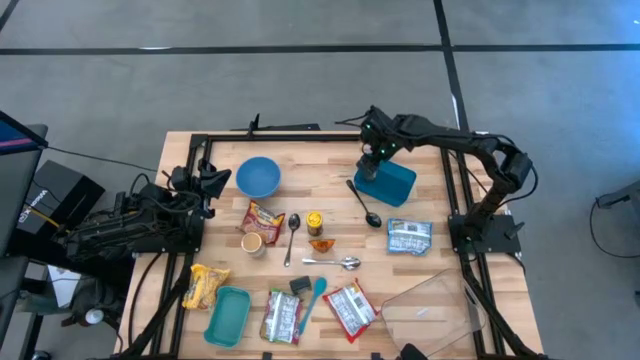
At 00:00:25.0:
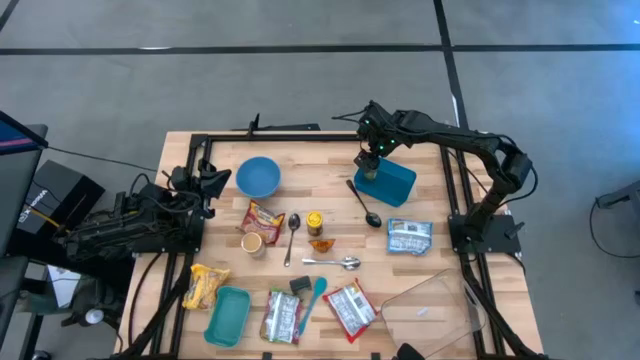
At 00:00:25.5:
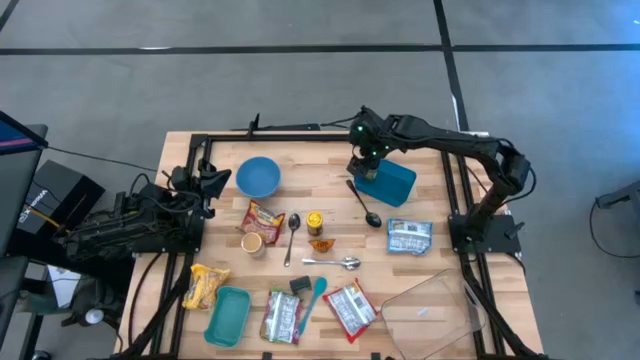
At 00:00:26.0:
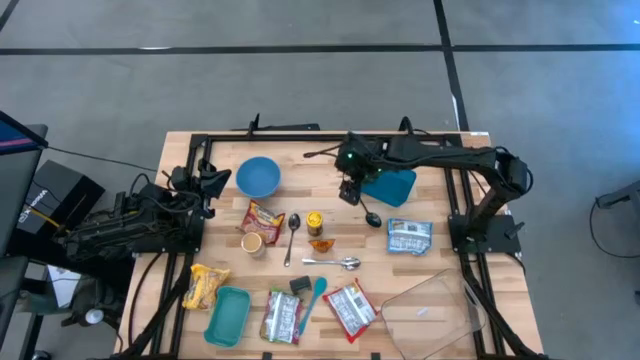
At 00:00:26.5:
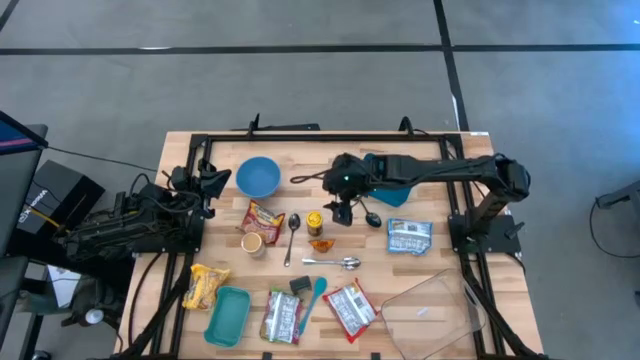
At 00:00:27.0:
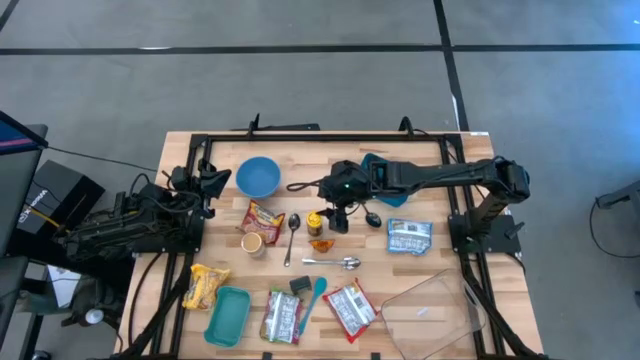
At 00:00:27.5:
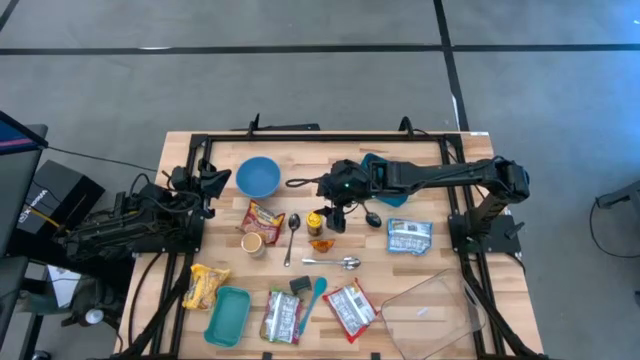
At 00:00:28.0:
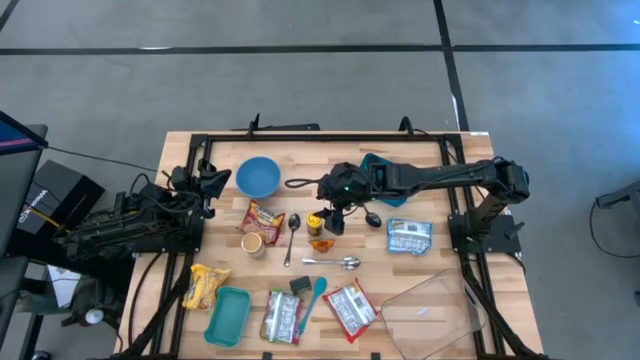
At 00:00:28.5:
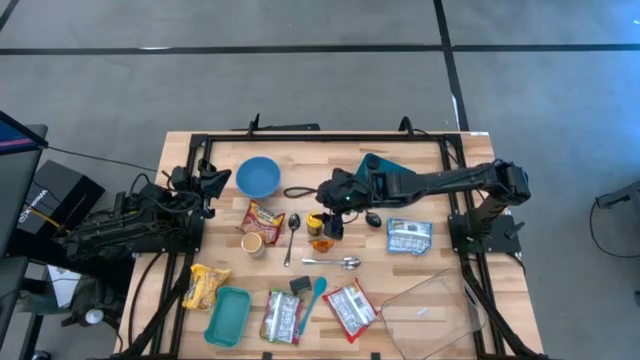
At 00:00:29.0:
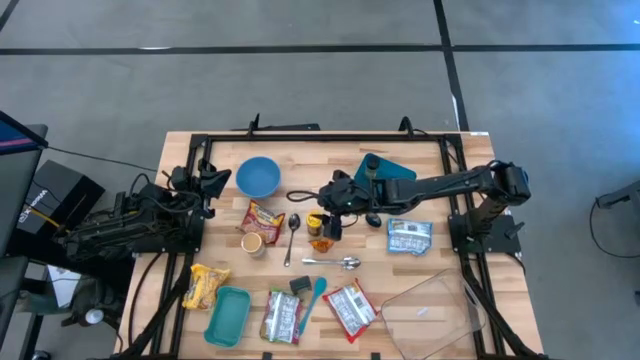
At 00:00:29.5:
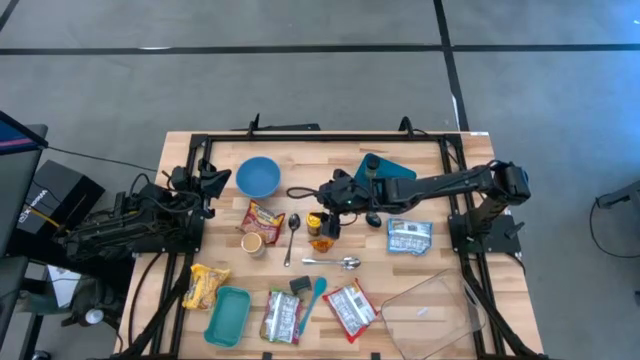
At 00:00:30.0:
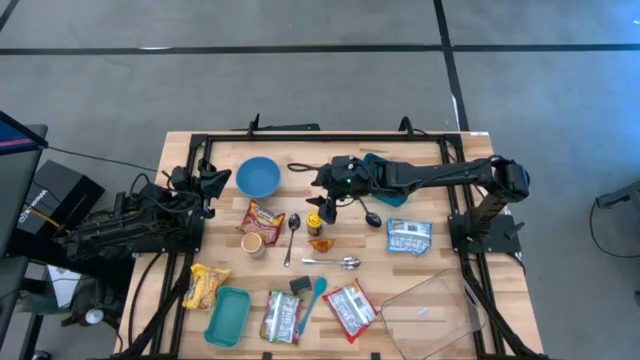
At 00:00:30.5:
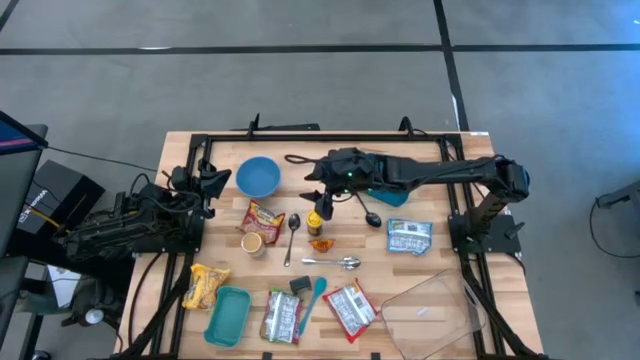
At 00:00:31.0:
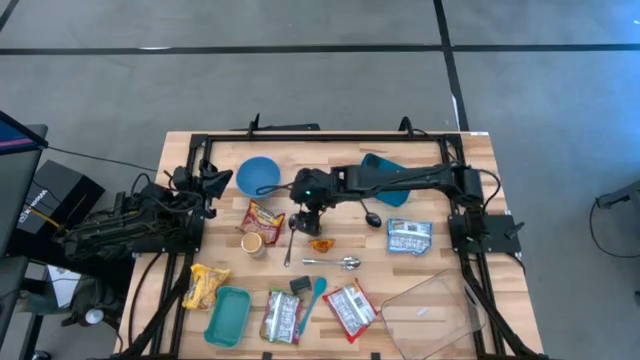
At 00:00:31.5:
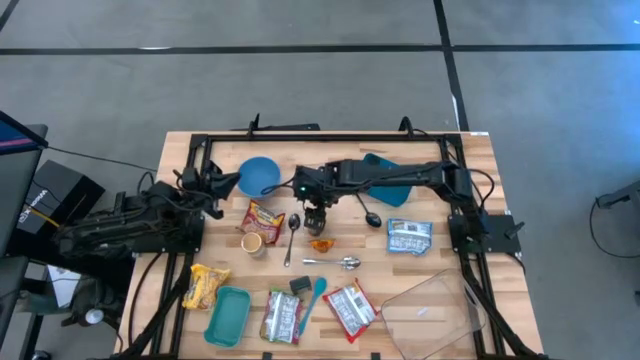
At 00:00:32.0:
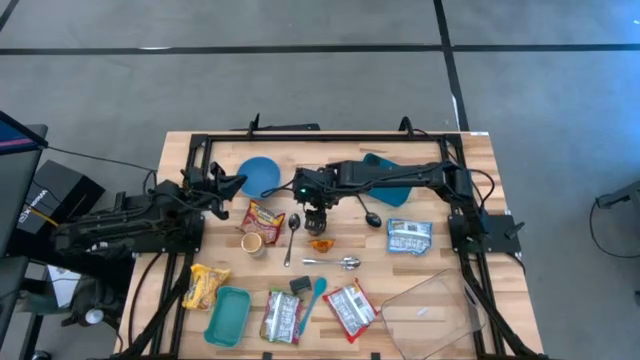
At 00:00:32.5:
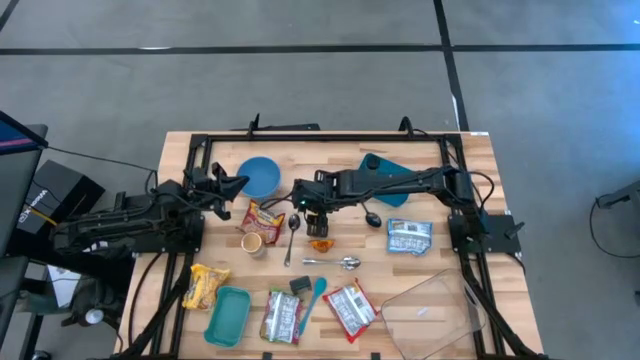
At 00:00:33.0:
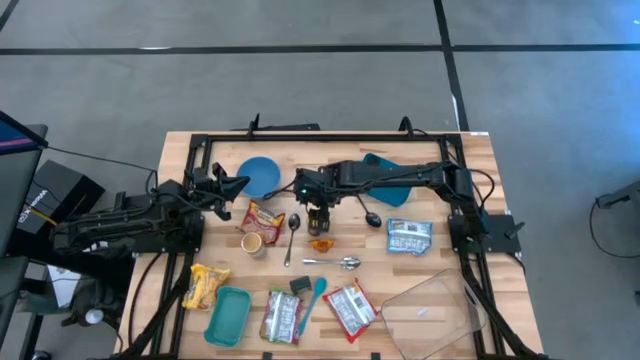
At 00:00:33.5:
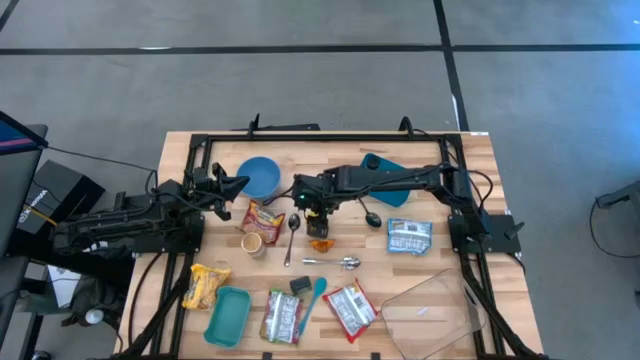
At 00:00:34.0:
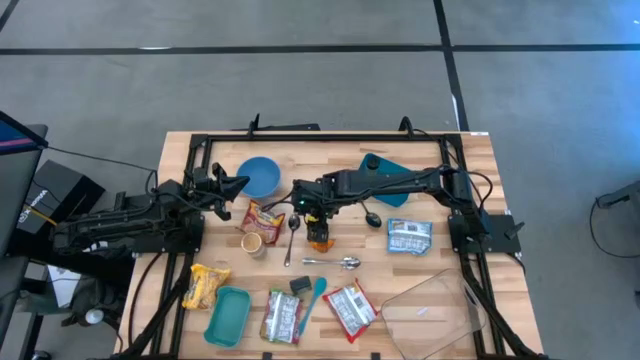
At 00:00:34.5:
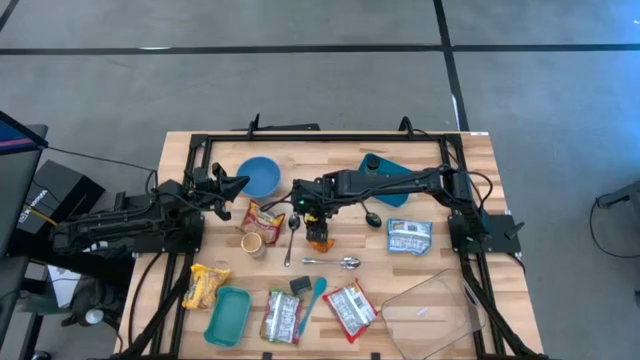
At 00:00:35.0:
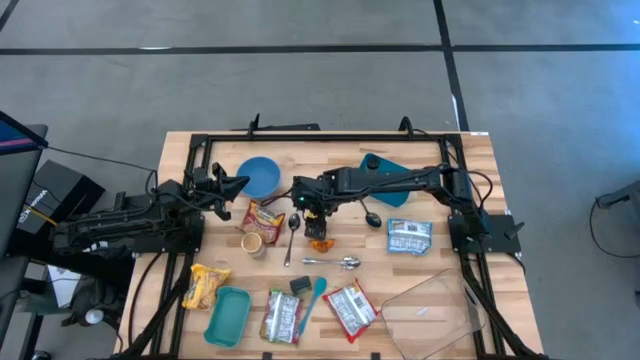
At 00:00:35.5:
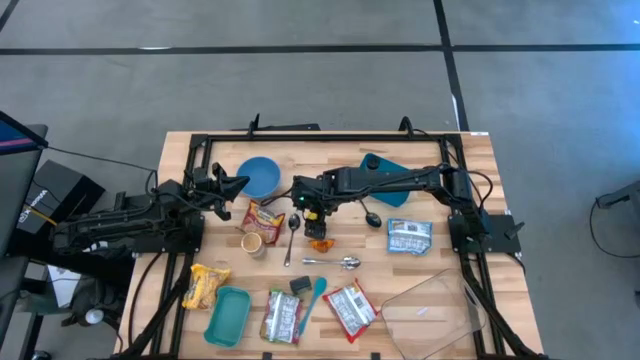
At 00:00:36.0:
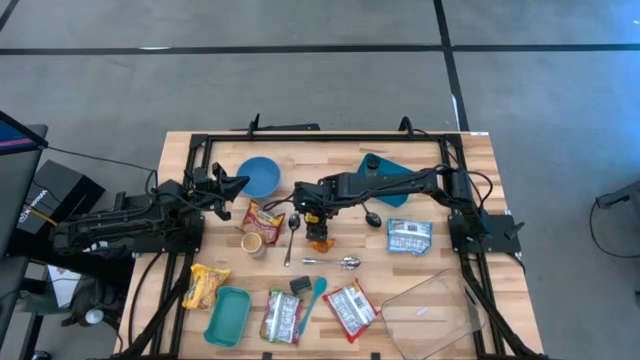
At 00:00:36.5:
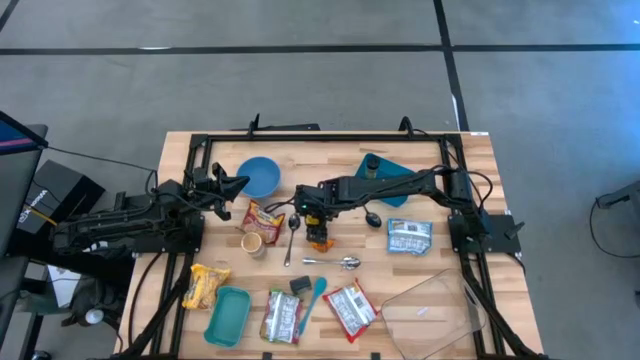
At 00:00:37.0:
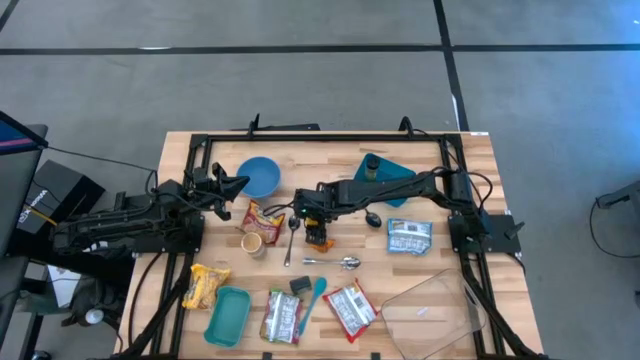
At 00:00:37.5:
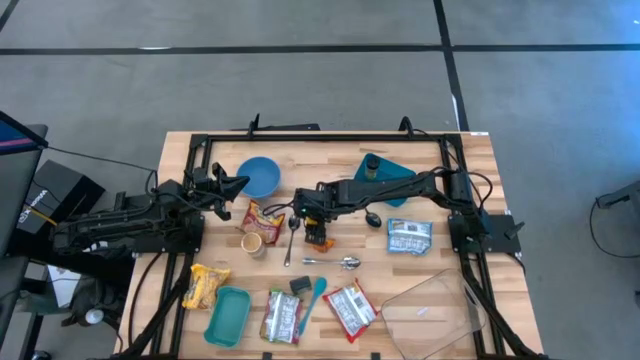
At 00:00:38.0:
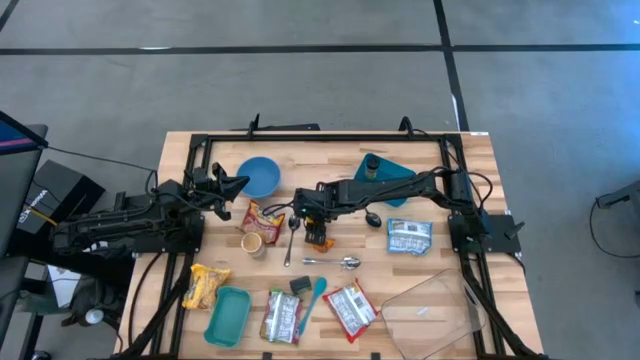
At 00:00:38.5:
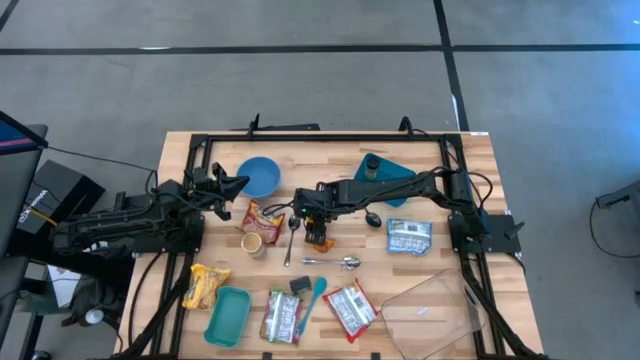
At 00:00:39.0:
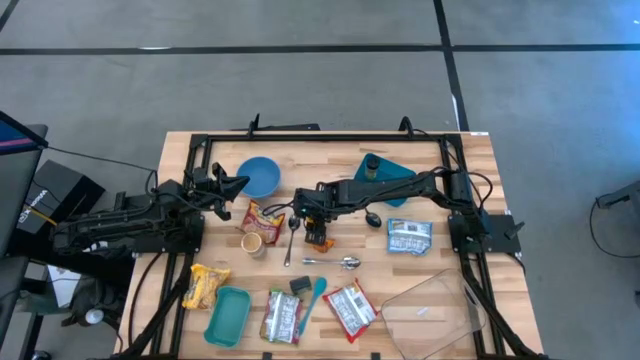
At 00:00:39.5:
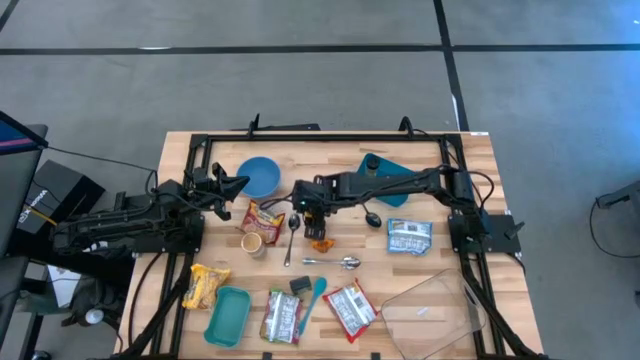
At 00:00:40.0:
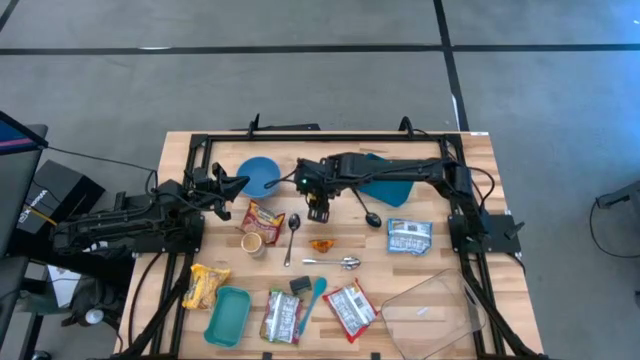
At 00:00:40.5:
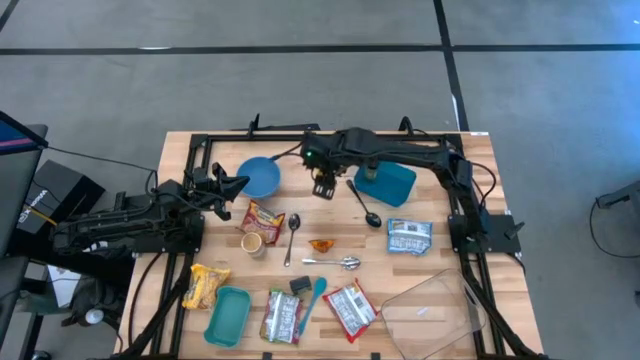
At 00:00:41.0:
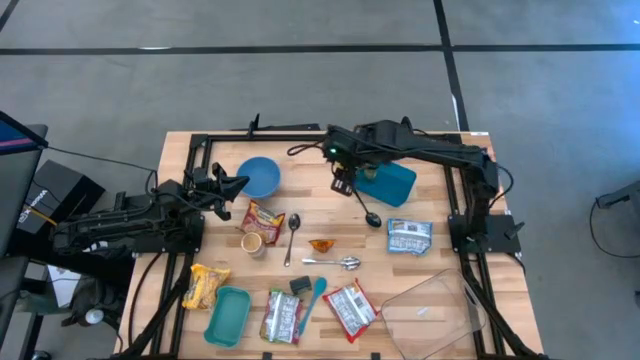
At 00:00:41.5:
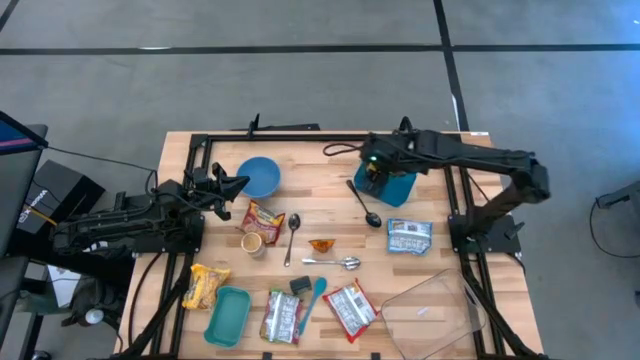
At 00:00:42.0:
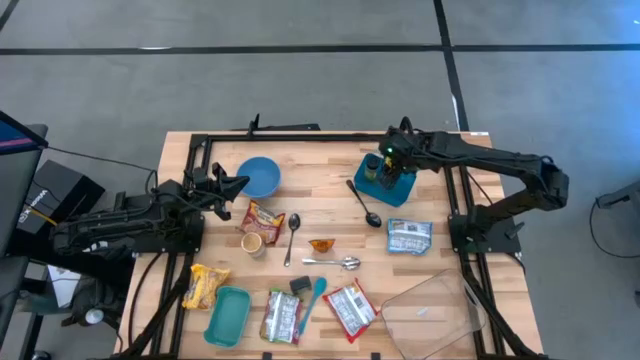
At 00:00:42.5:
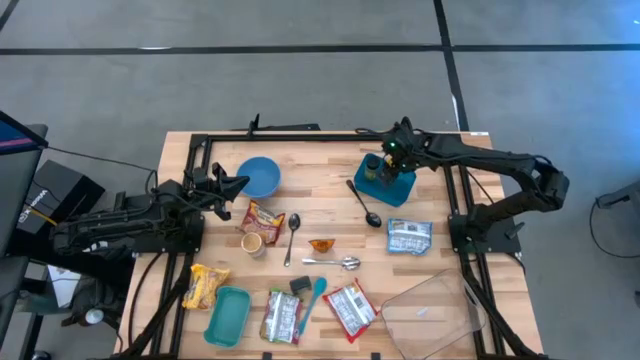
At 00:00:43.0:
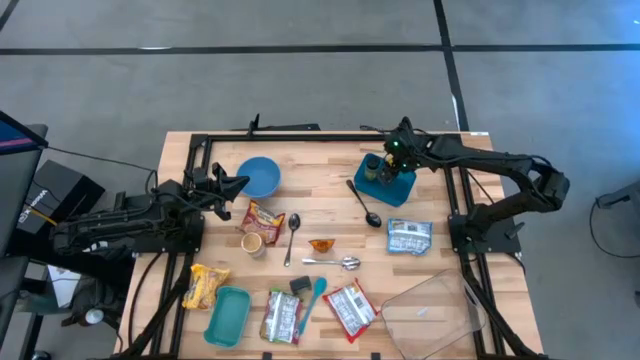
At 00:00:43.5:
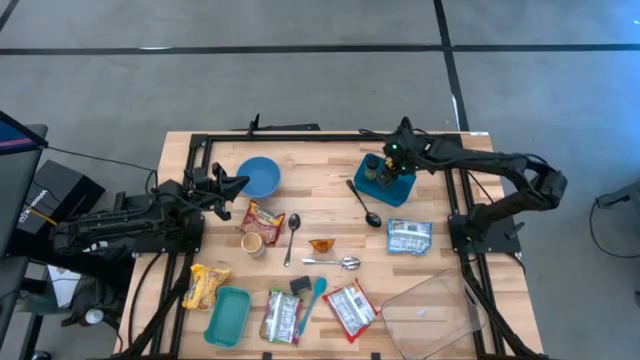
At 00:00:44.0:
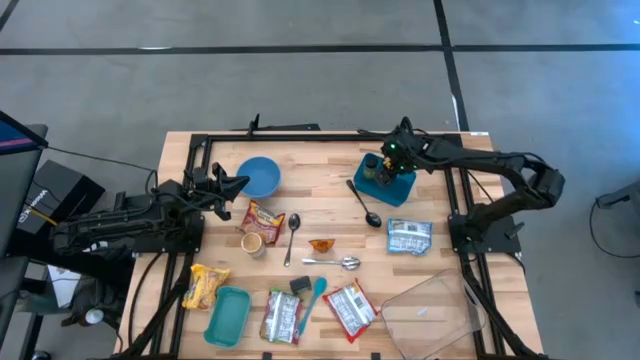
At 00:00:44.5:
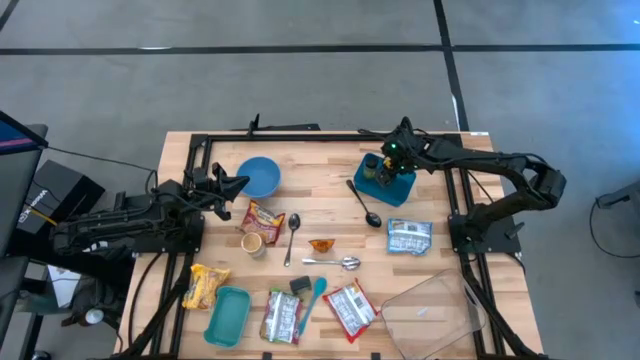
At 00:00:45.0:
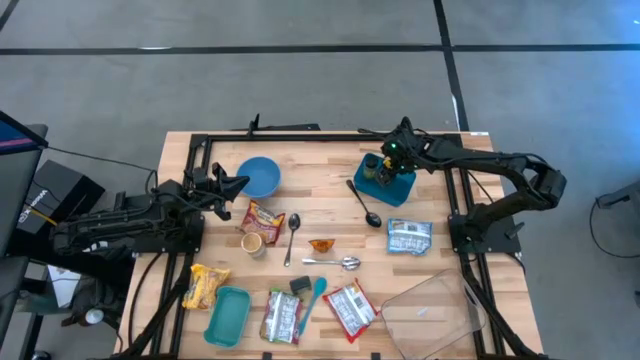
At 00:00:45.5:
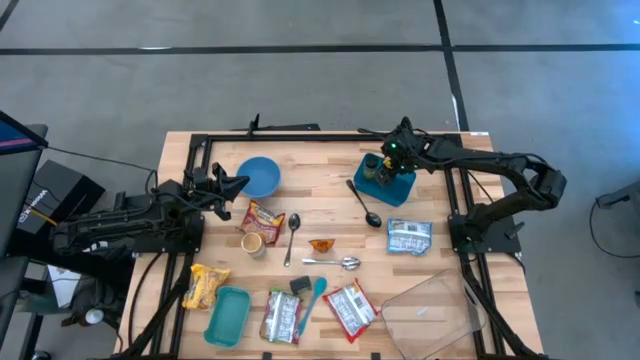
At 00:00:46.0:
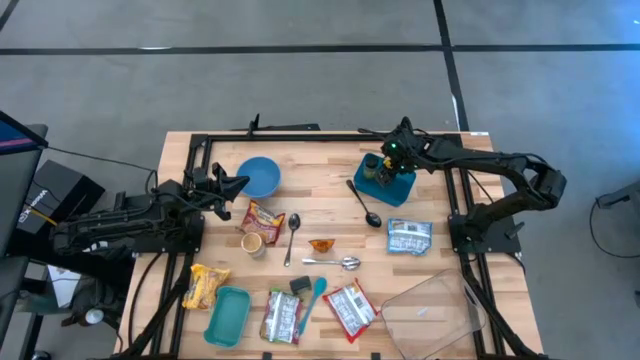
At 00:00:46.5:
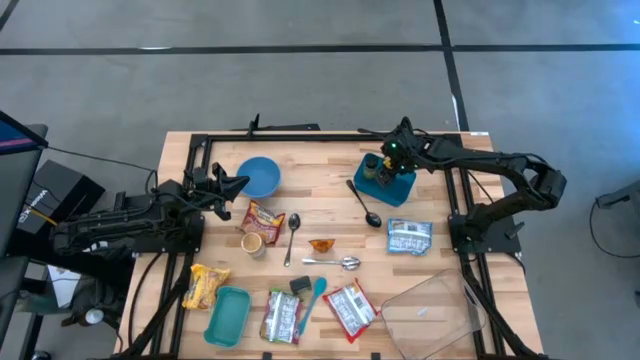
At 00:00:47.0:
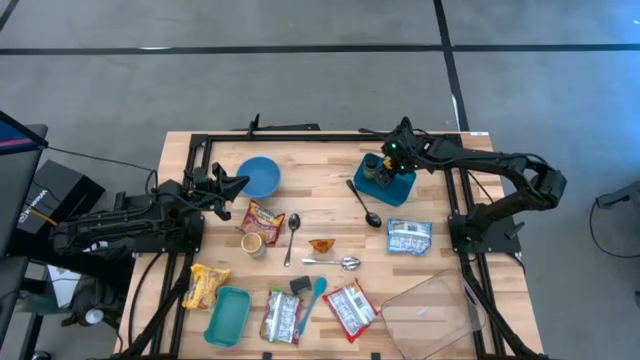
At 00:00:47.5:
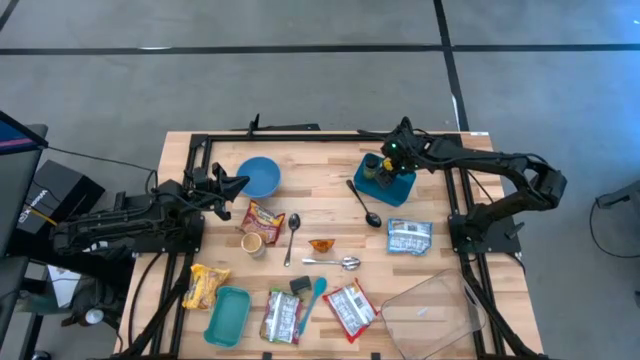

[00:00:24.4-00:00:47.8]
Task: Pick & Place Food Item
Put the yellow seasoning bottle into the blue bin
